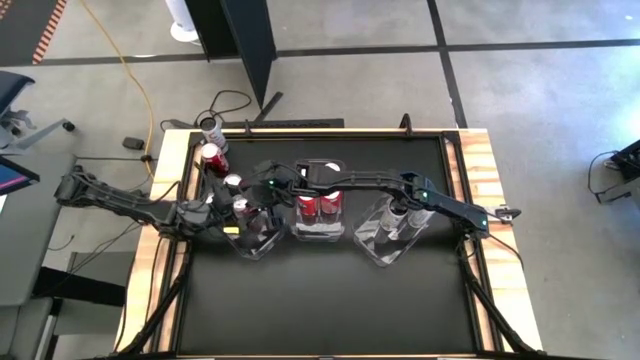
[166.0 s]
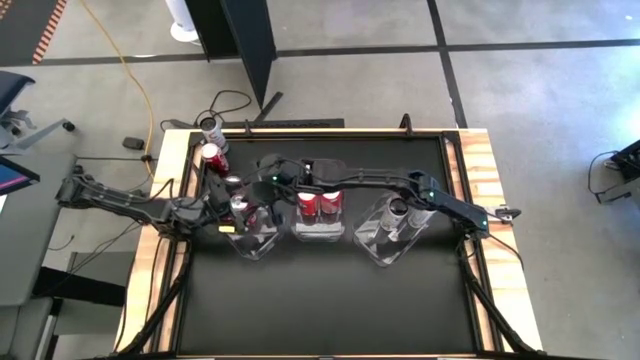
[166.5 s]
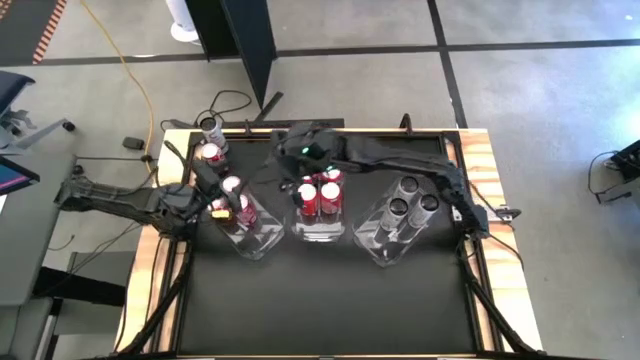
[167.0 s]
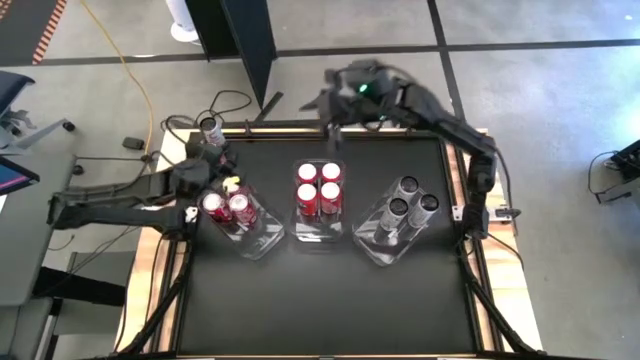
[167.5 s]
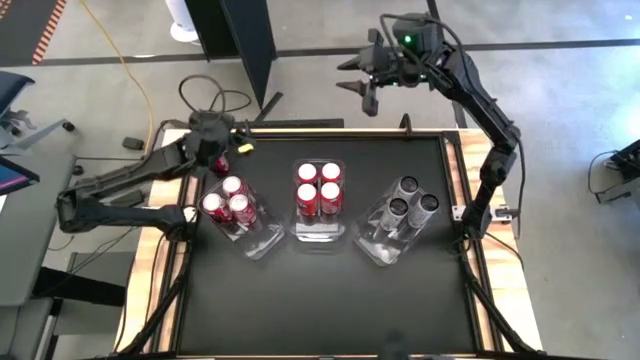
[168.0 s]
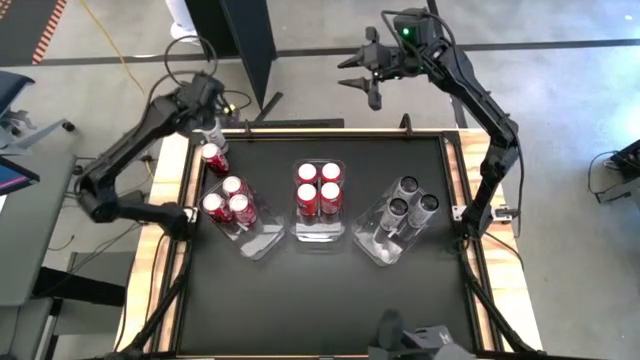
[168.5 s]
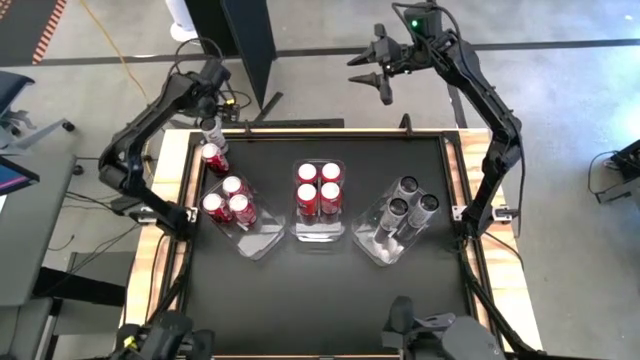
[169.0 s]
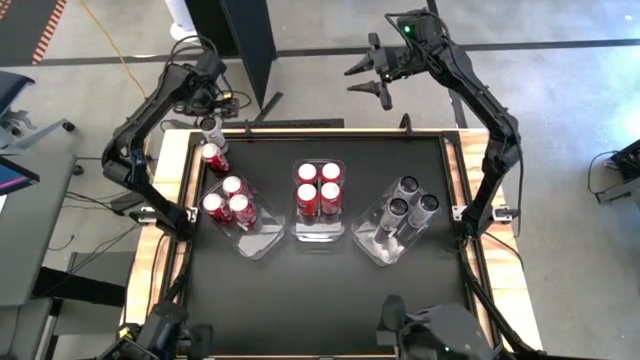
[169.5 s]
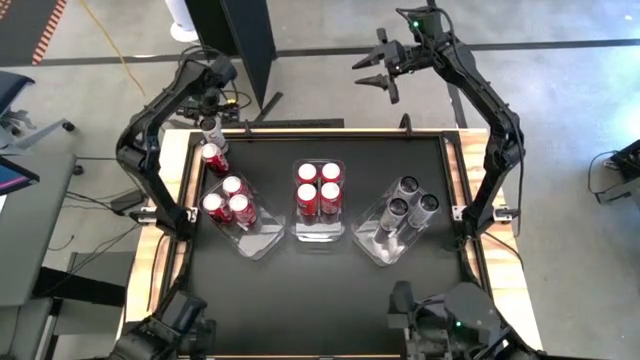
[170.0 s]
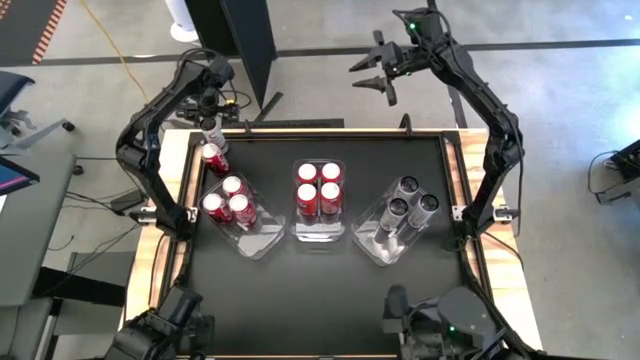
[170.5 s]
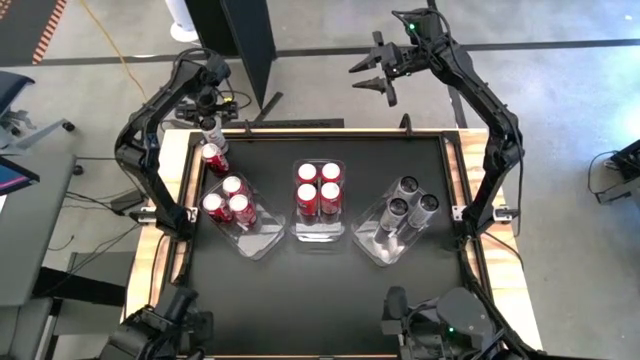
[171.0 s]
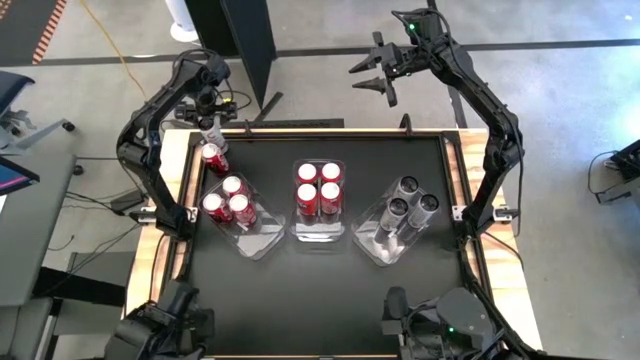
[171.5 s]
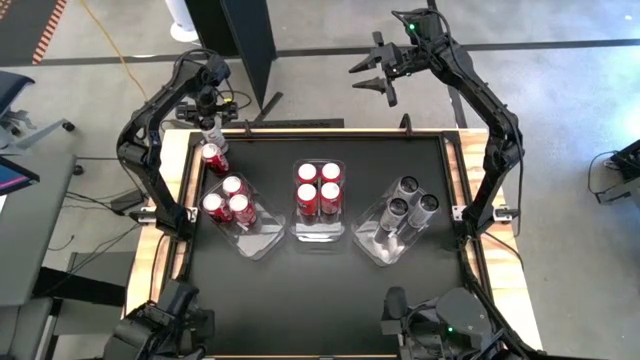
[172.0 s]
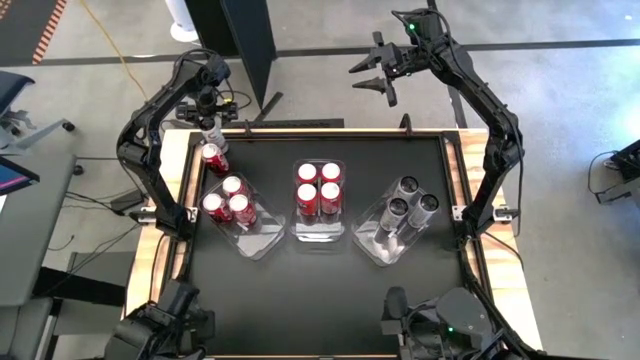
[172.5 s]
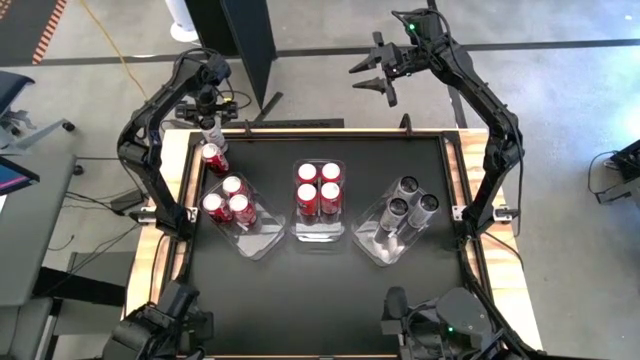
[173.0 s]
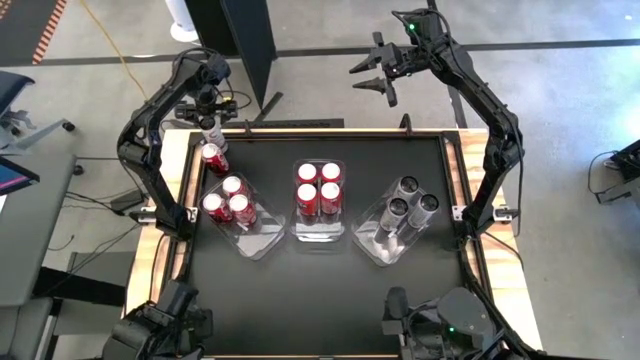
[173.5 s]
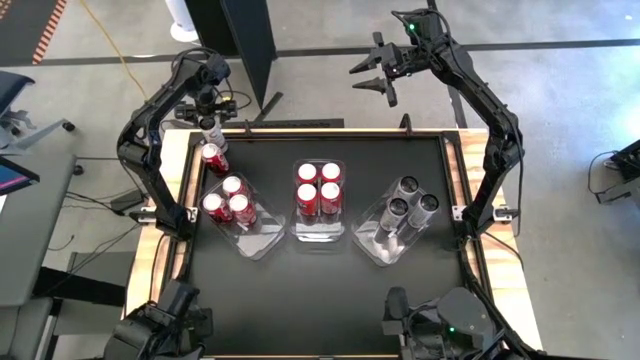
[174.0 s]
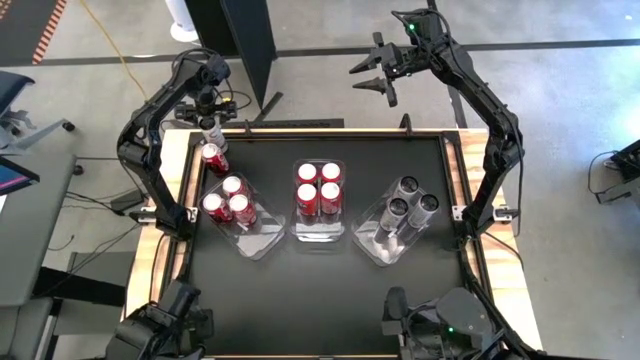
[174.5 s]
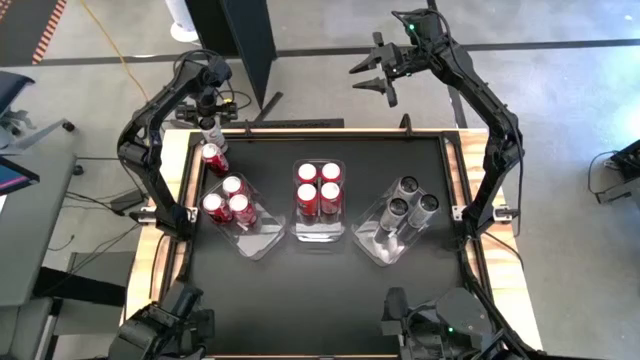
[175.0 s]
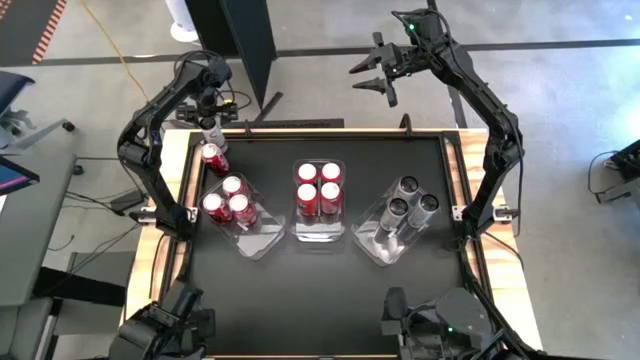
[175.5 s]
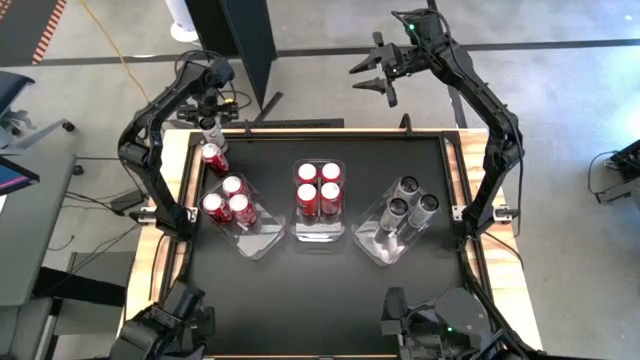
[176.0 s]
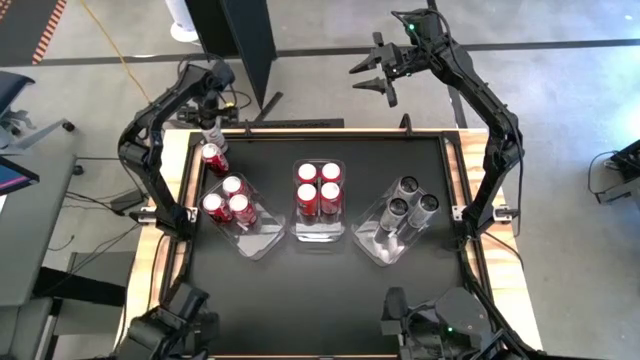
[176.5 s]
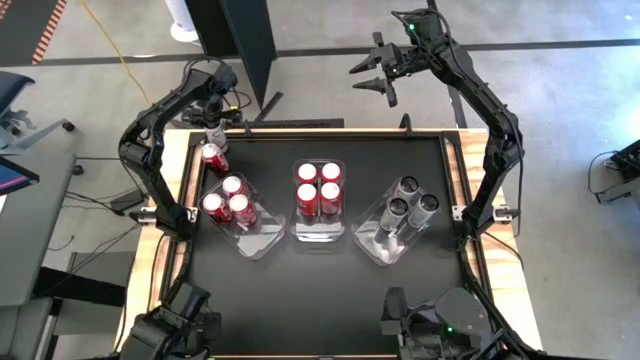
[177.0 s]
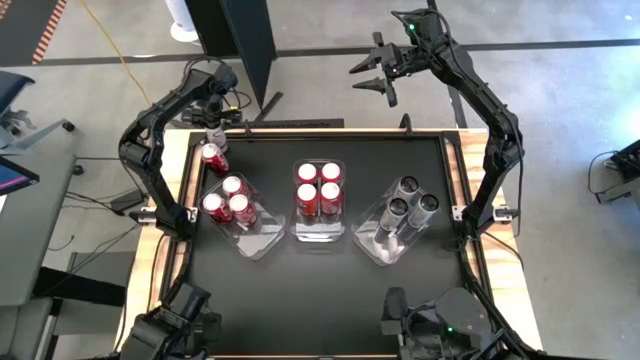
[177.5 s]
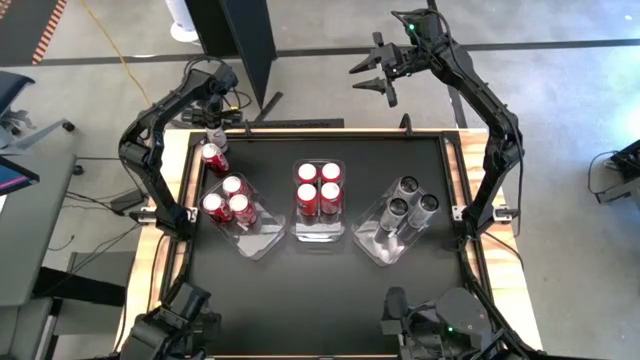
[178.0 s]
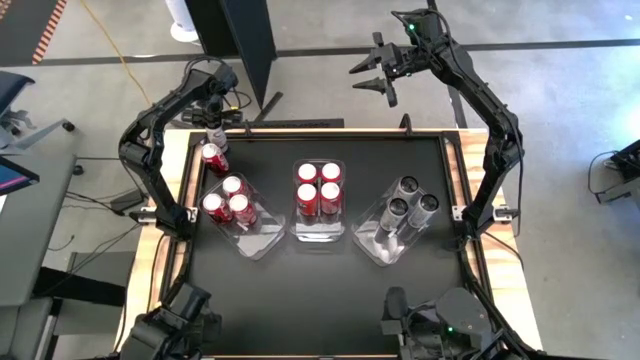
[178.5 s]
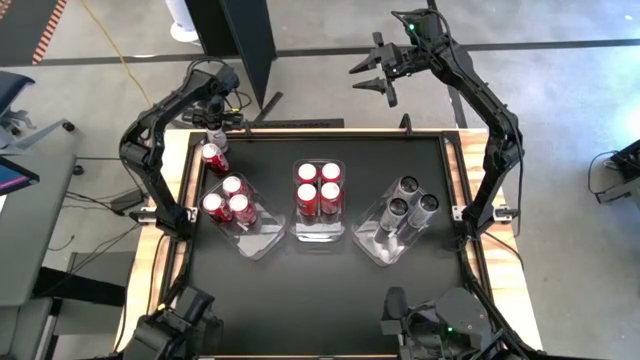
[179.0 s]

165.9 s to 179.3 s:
Task: Sort soda cans
Put the white soda can into the right transparent bin

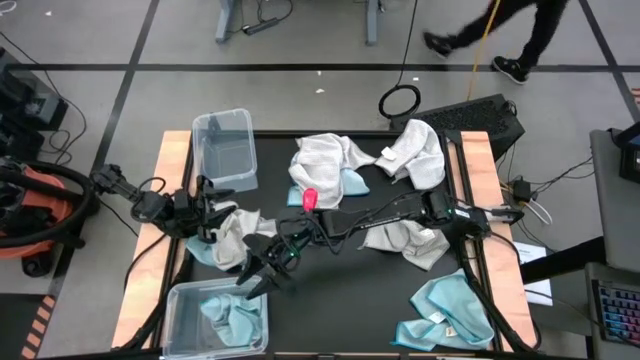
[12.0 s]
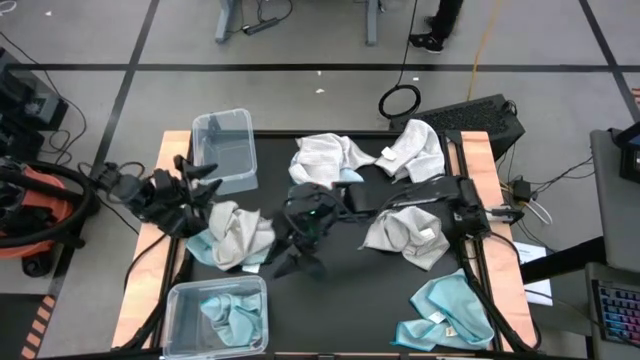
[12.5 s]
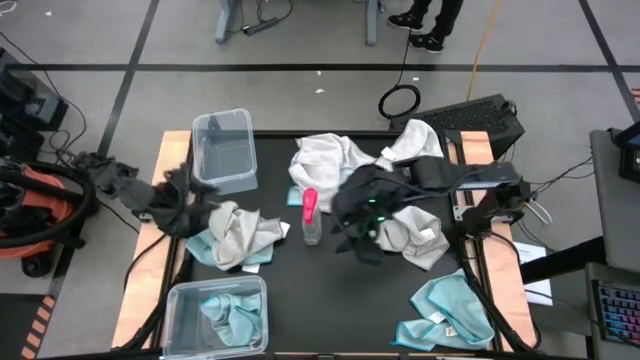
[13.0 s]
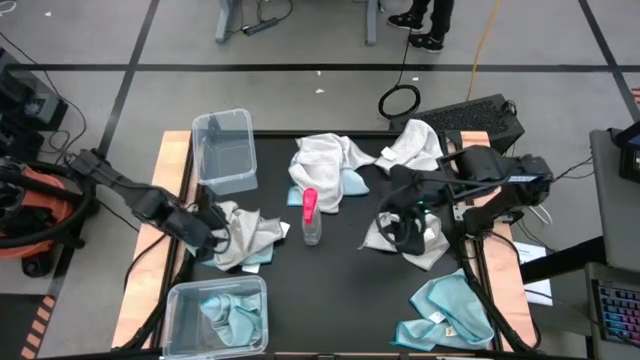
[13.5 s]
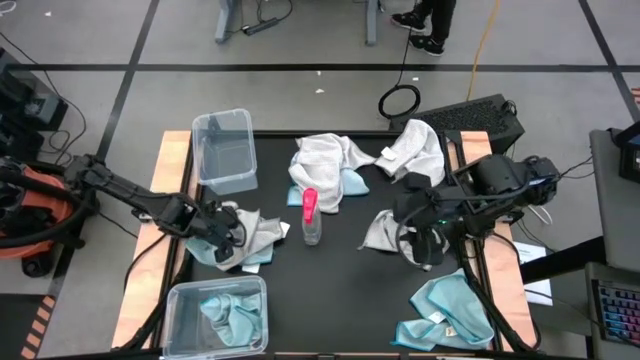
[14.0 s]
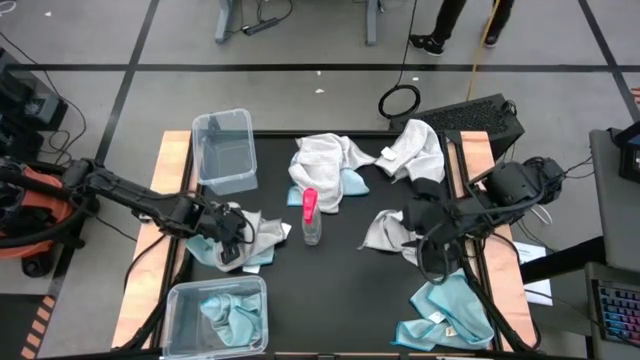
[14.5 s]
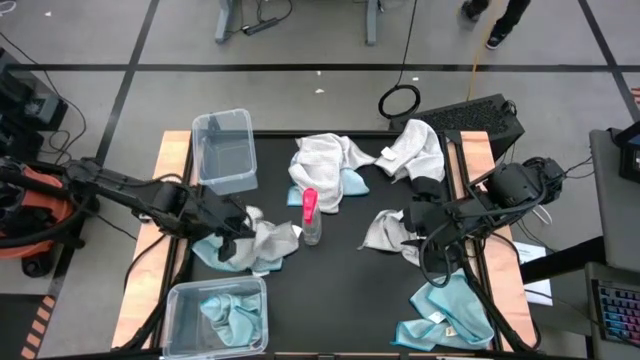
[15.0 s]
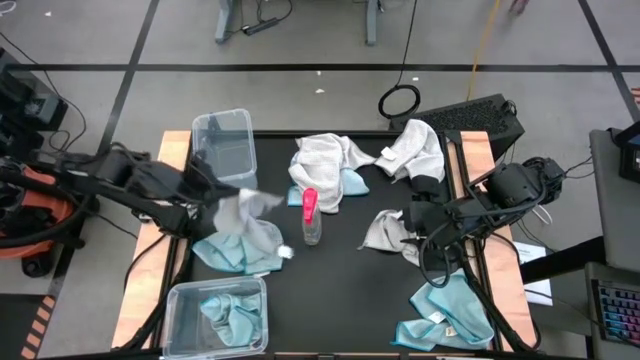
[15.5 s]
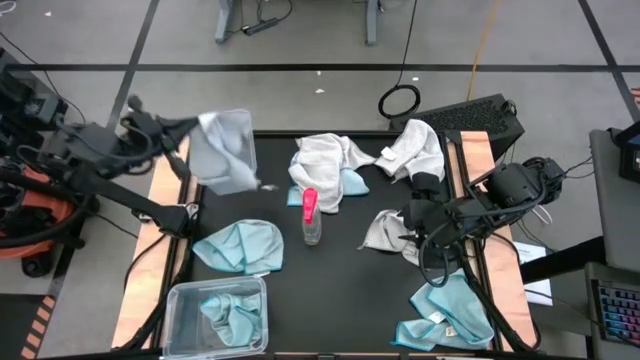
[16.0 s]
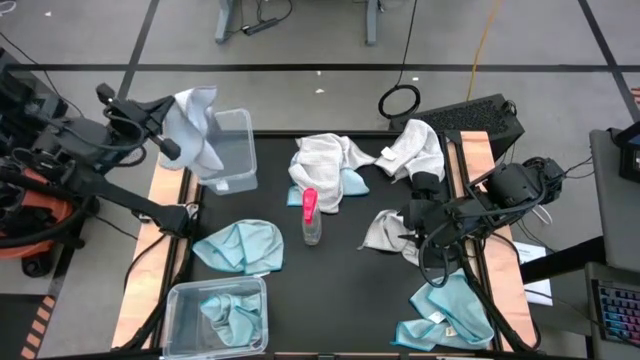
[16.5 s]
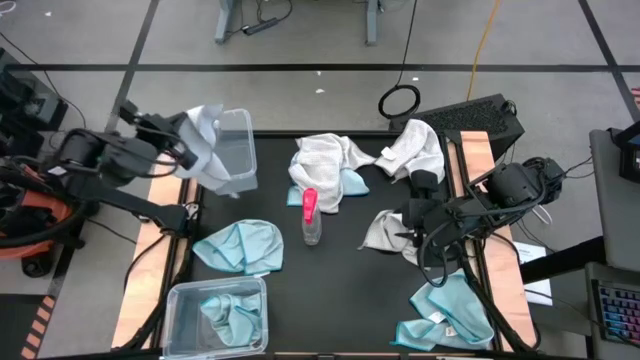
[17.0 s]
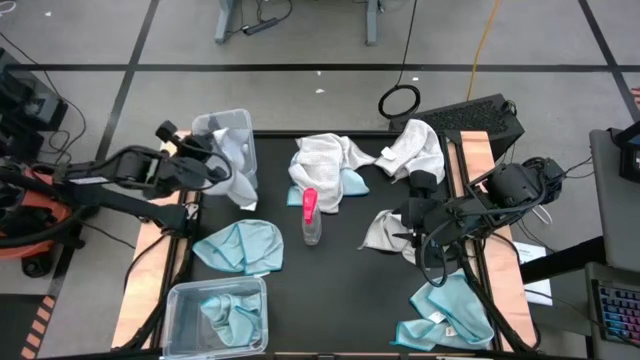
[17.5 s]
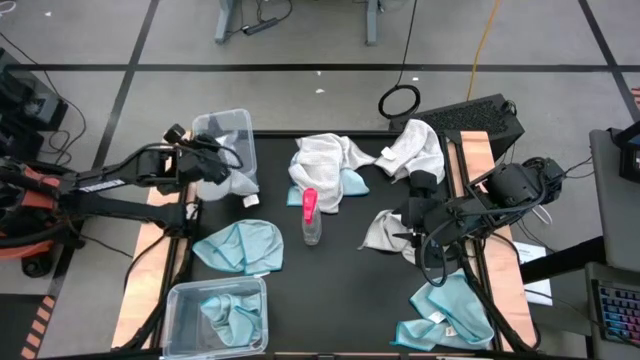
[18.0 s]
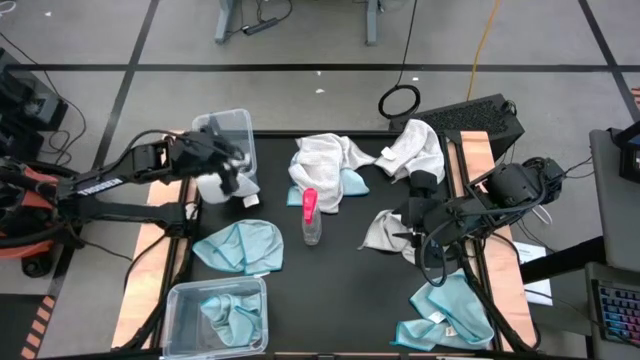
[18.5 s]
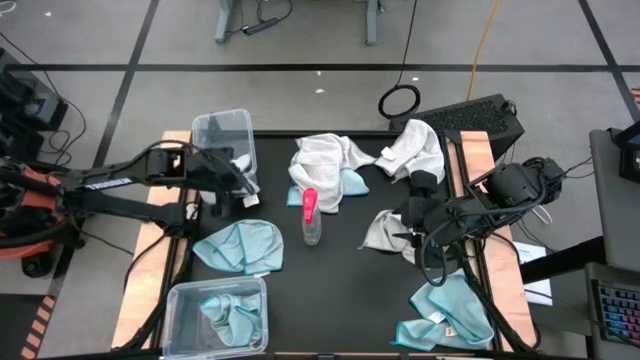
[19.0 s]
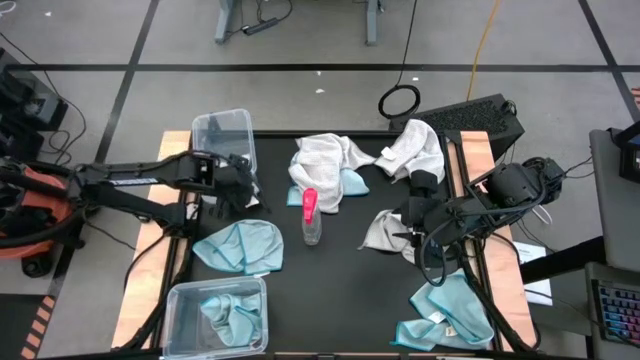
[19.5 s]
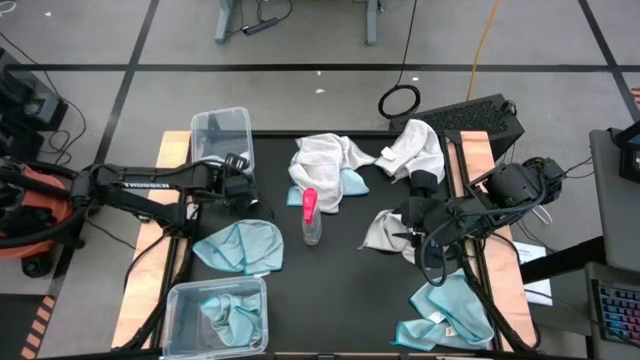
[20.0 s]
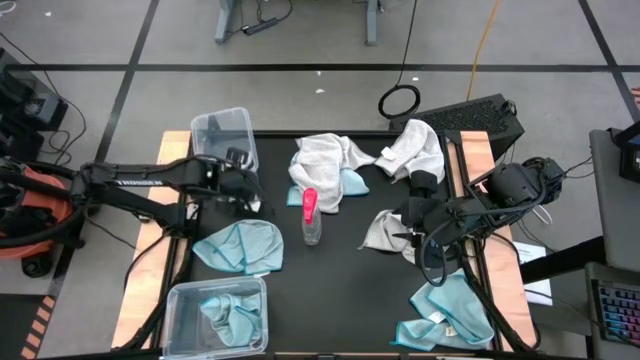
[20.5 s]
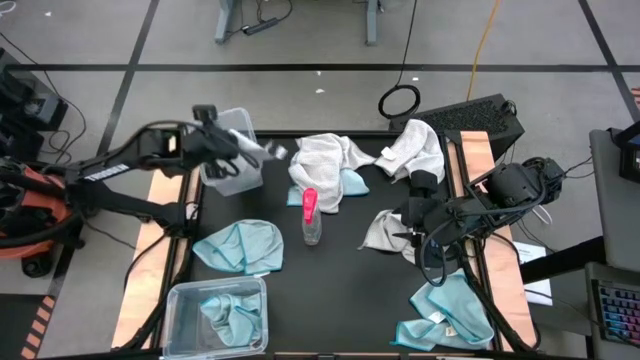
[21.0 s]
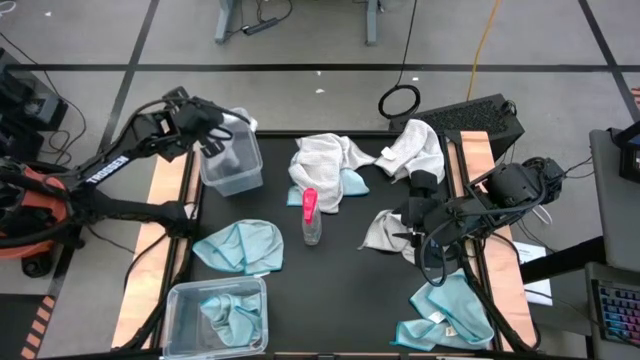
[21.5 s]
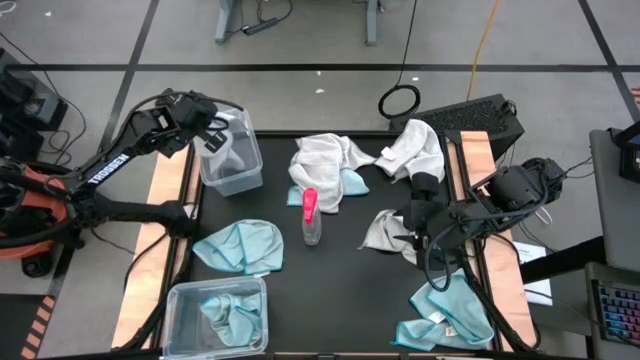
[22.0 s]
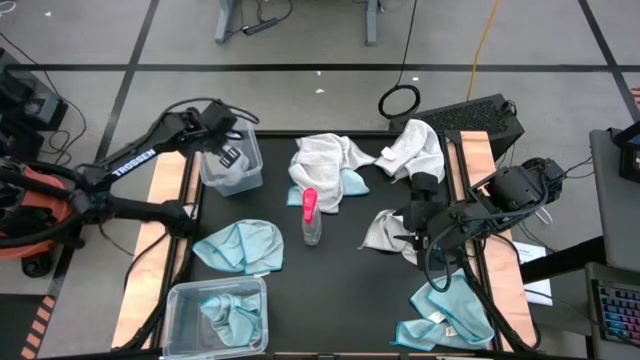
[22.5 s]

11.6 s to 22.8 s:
Task: Sort microfiber towel by color & place in baskets
Put the gray towel into the top transparent bin
